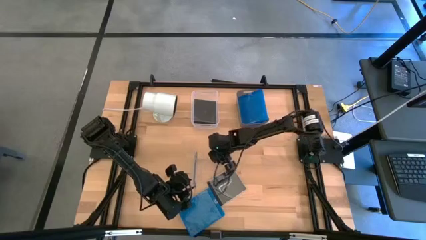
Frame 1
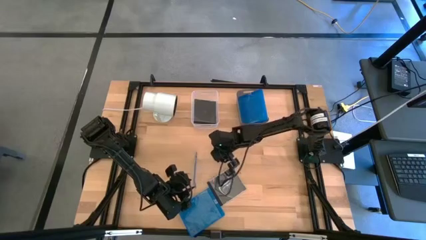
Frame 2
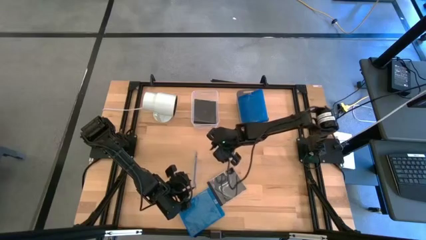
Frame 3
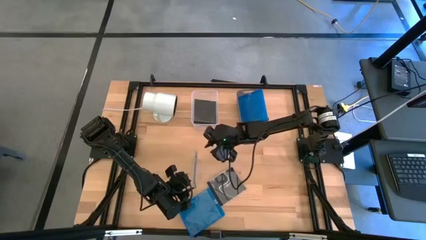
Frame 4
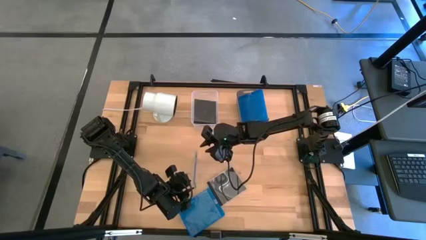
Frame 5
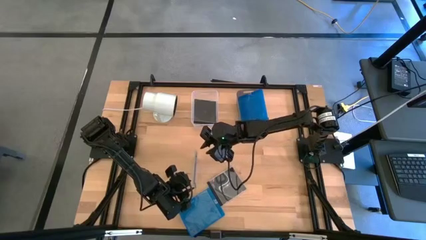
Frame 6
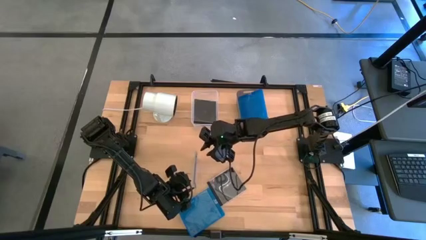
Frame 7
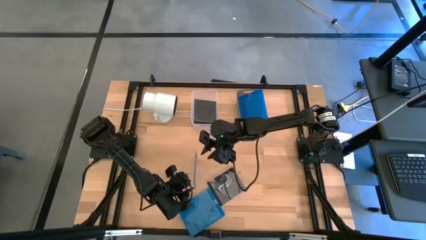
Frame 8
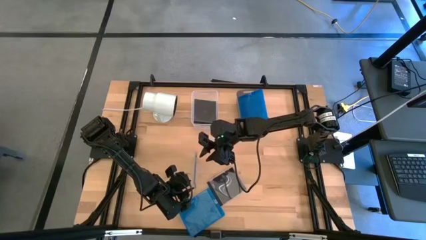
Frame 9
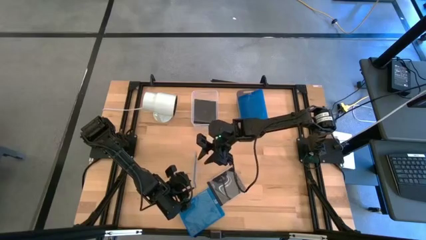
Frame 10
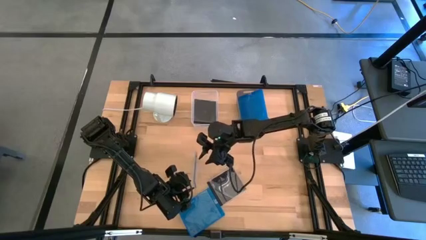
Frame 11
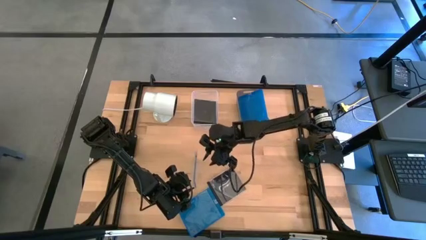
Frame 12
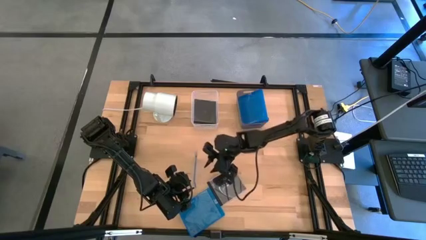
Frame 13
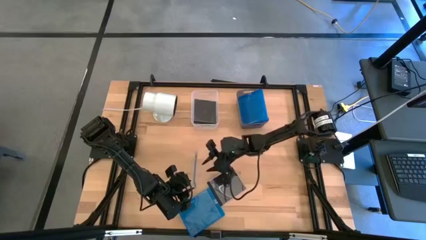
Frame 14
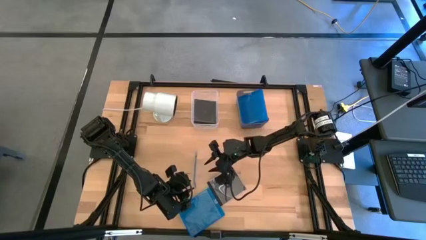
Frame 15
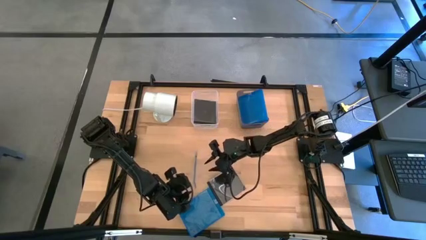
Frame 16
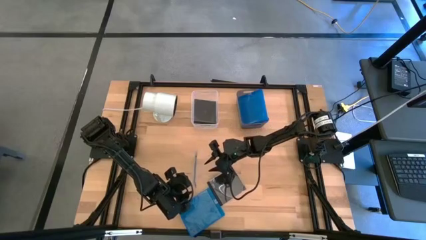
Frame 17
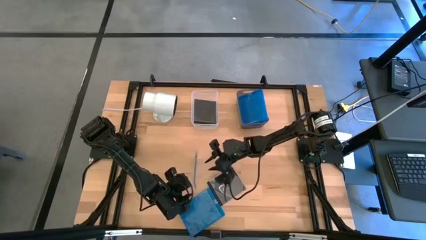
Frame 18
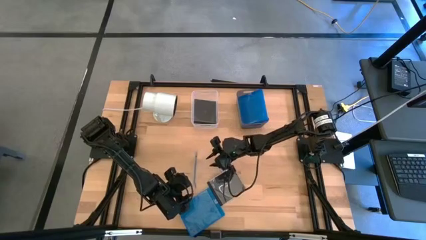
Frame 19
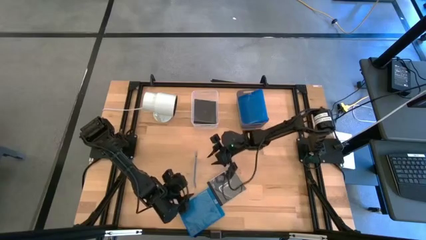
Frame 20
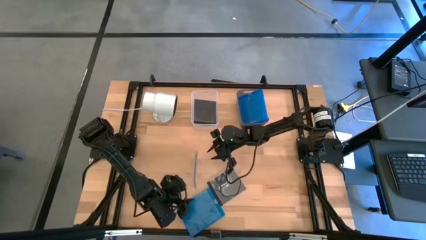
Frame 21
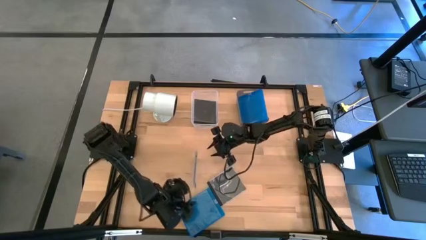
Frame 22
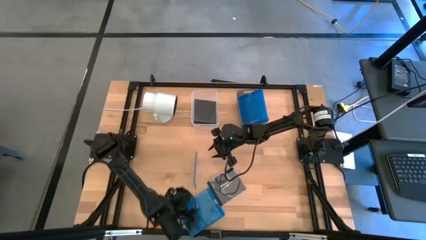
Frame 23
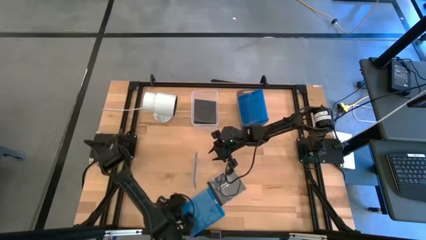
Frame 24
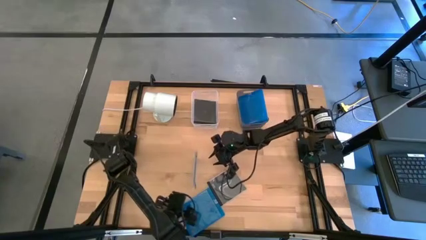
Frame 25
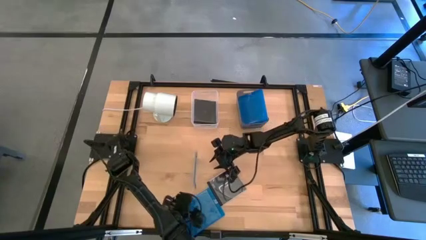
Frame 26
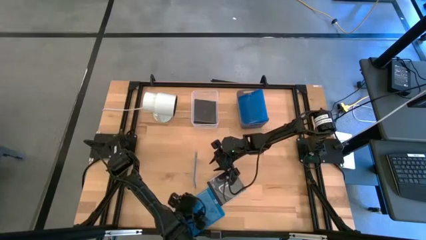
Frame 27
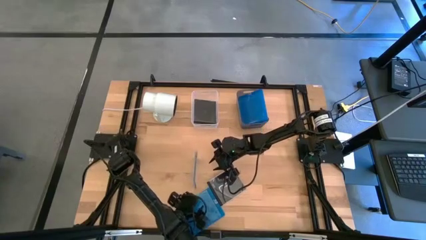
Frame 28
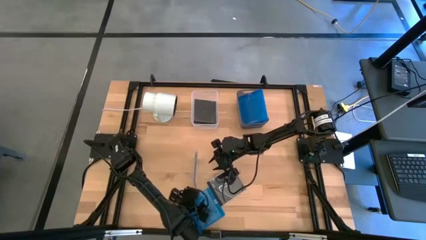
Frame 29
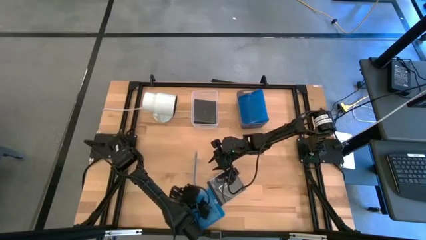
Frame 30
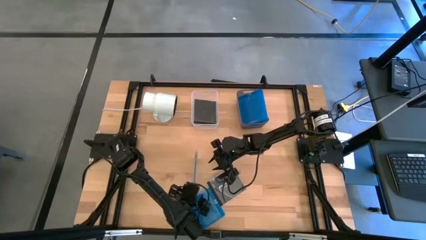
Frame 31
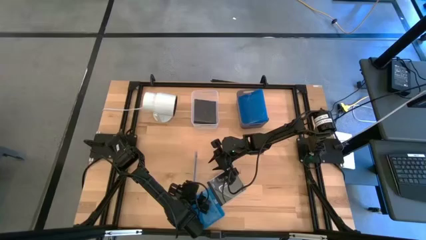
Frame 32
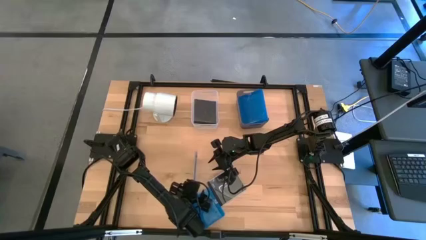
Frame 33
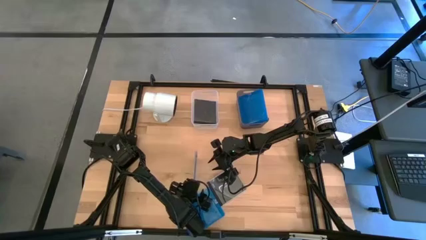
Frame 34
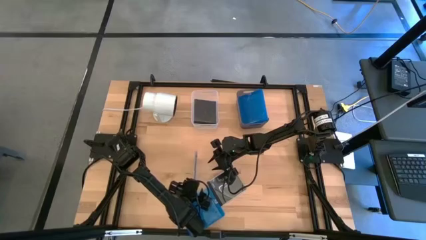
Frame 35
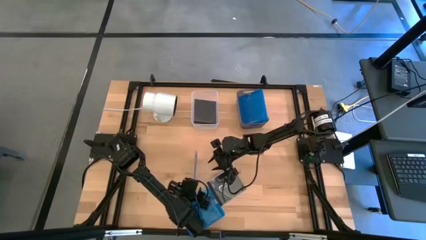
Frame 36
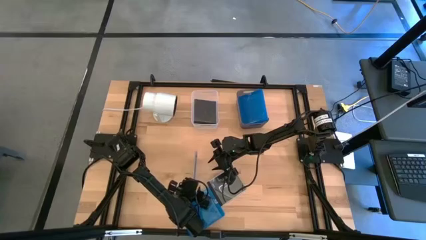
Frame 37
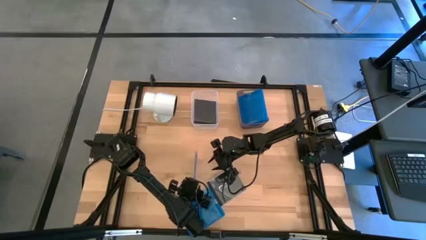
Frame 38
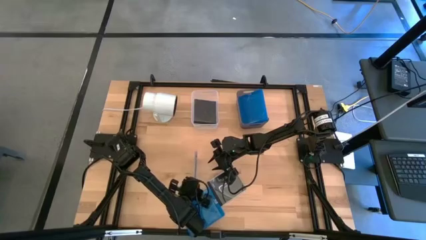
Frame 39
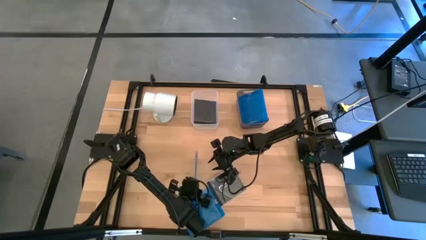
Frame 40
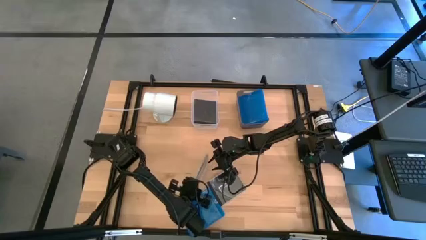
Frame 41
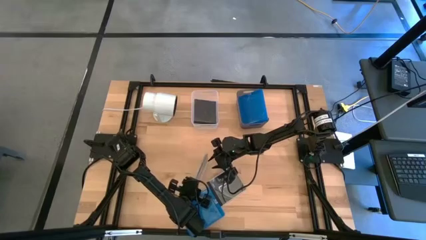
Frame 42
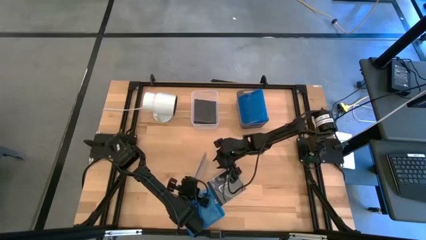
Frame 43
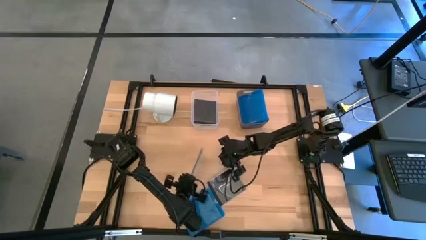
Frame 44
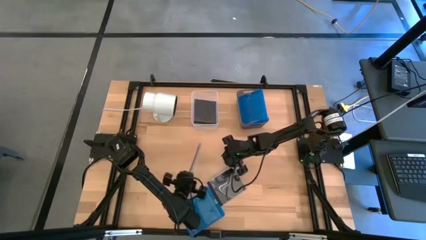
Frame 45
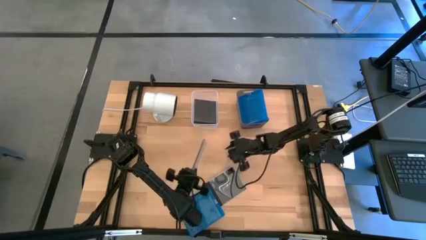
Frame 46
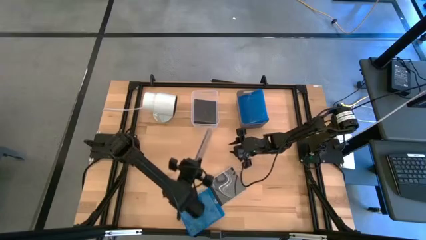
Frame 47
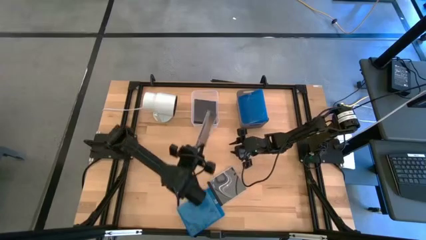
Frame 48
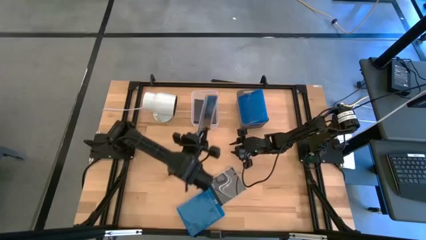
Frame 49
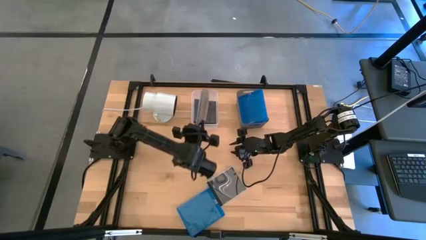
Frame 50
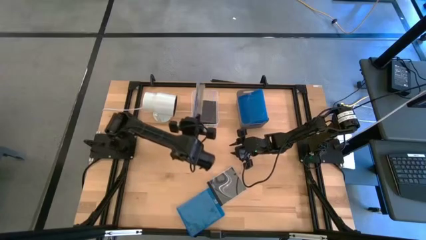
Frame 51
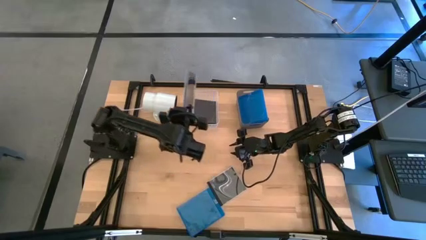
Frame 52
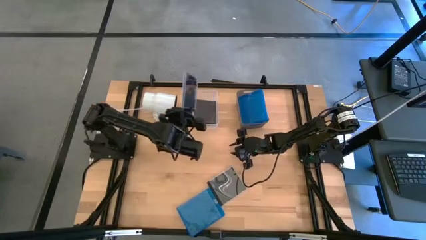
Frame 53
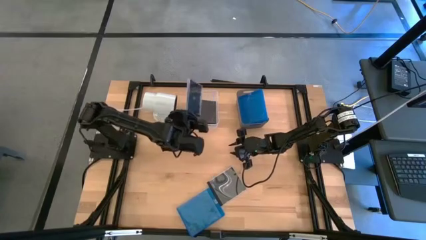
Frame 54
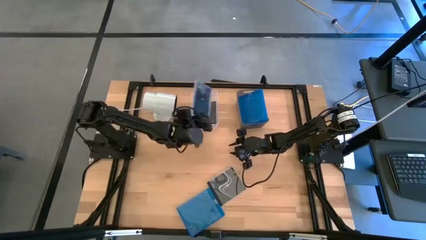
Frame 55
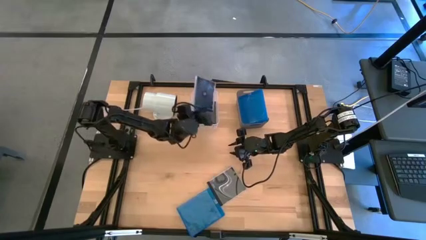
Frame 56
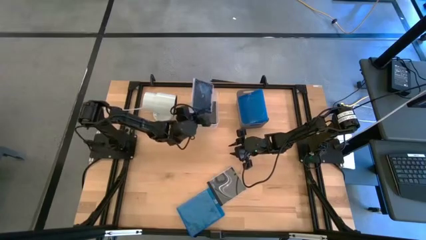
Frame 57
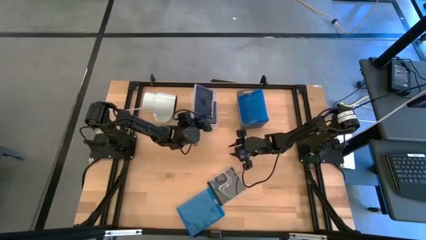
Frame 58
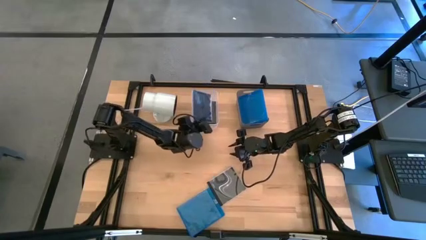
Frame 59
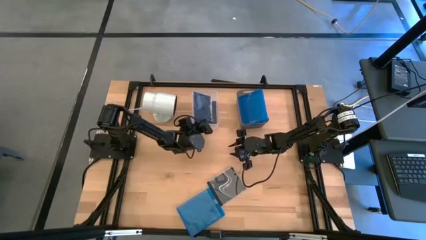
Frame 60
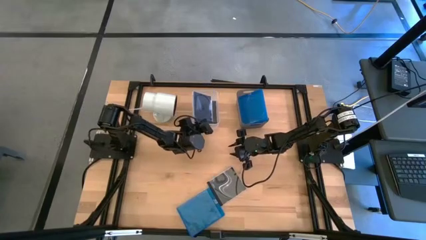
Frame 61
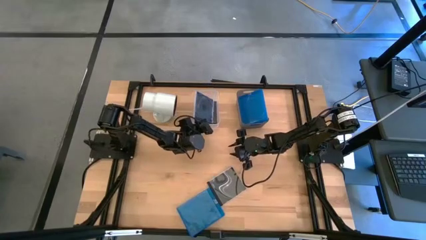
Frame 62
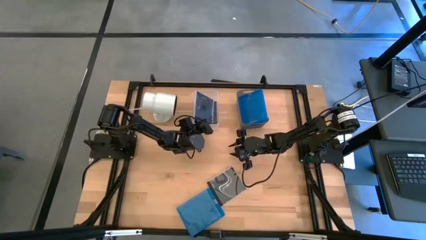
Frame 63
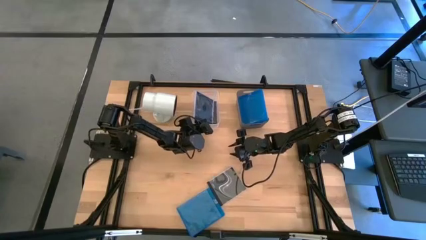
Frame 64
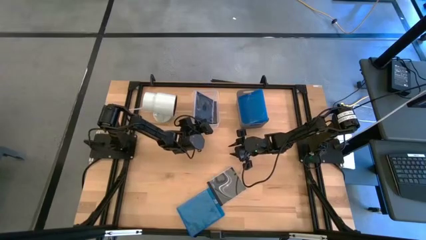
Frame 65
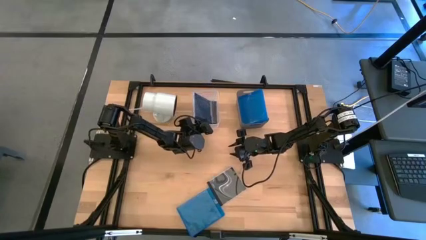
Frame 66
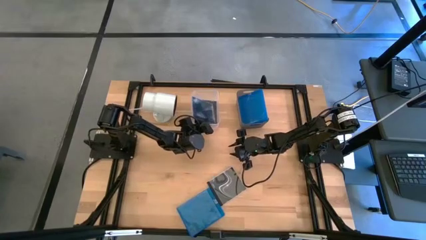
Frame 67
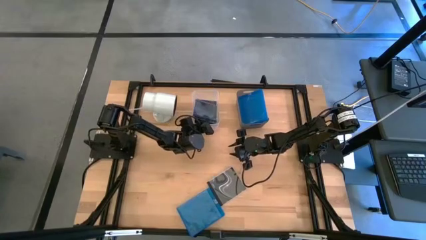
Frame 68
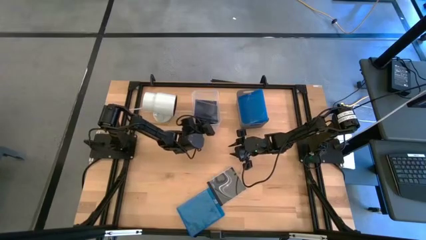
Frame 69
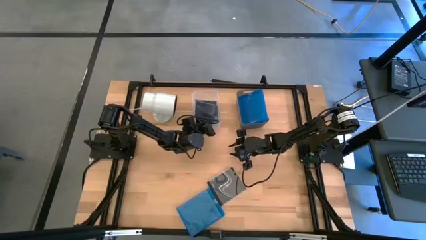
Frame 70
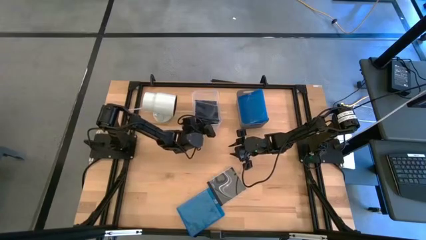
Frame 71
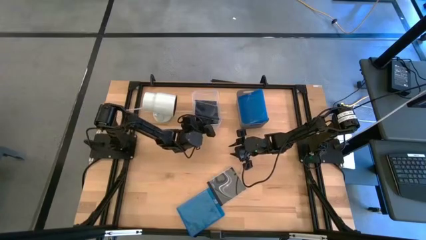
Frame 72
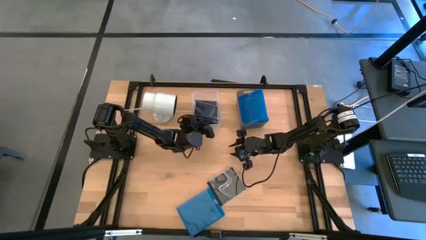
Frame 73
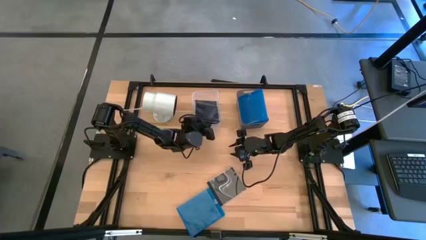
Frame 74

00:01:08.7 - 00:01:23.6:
Task: Pick & place jewel cases by type
Put the left black cd case into the white bin

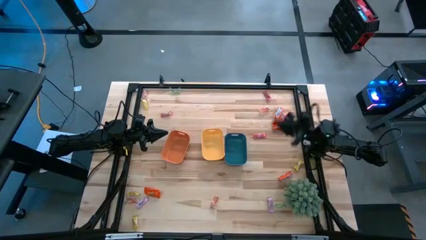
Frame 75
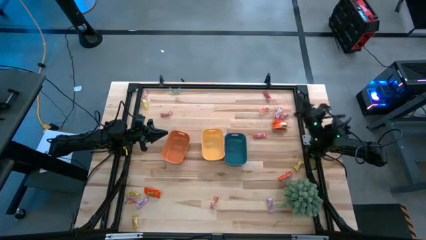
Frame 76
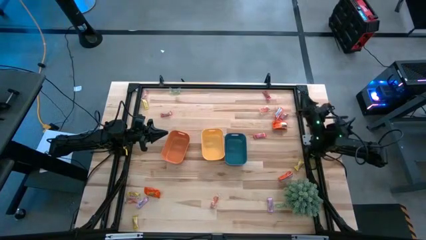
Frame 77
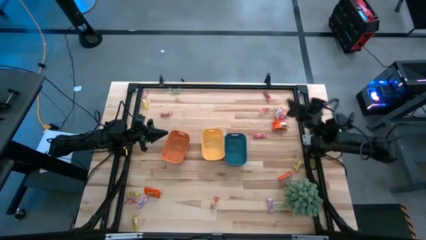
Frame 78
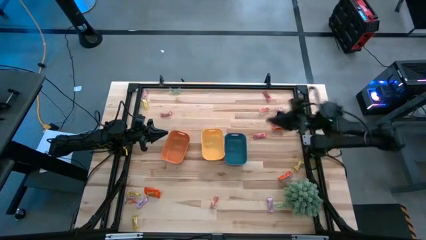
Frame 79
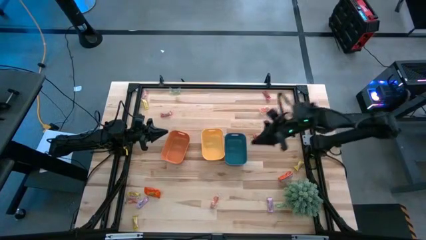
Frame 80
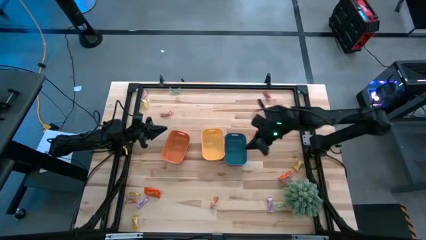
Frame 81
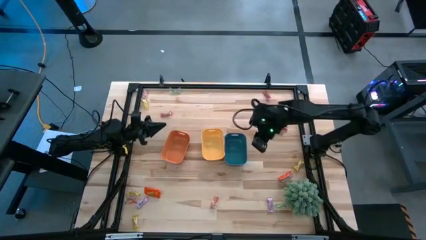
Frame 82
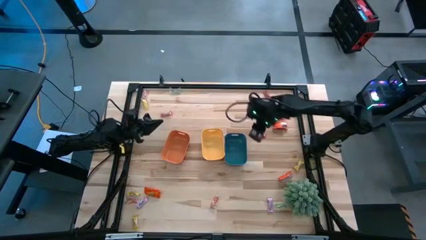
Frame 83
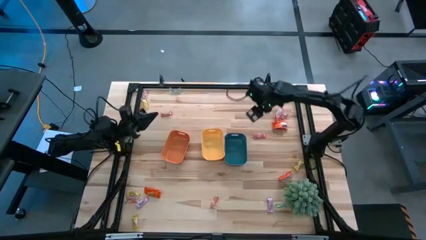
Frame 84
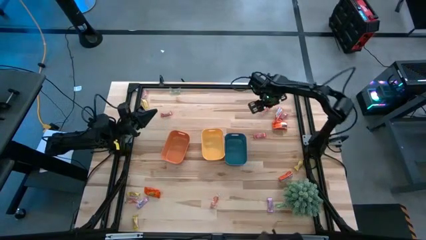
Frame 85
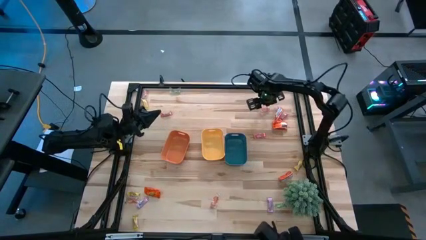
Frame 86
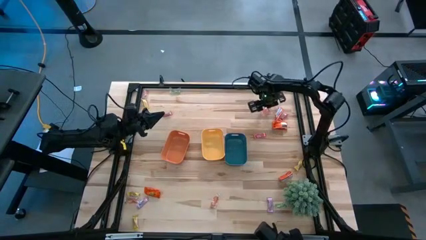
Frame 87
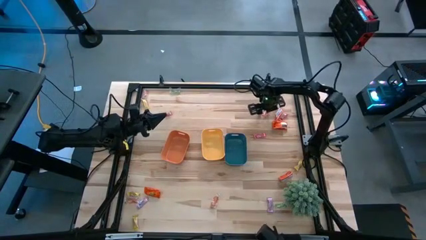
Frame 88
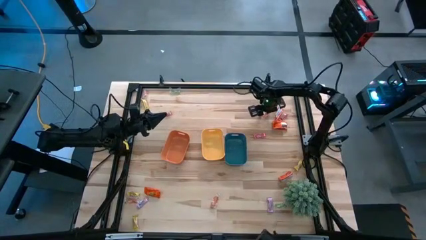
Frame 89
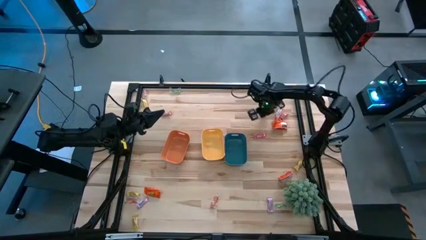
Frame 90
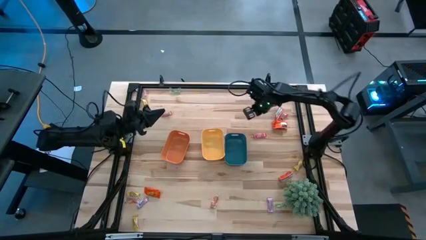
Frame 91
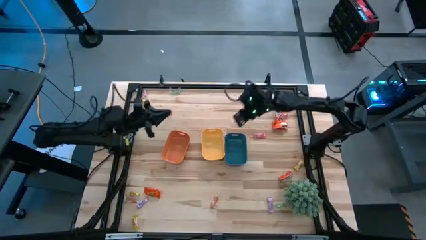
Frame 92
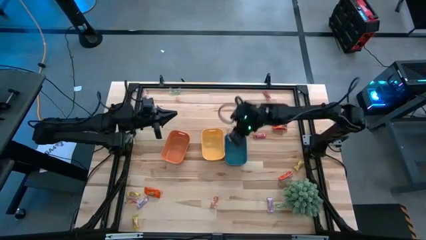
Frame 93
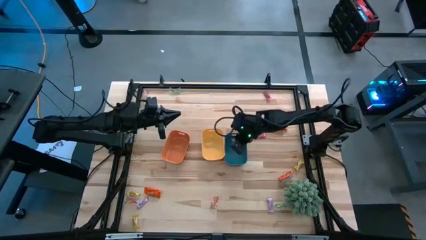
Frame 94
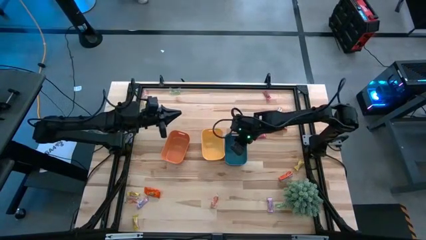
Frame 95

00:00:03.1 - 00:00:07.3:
Task: Sort candy
Put the orange gummy into the blue bin
